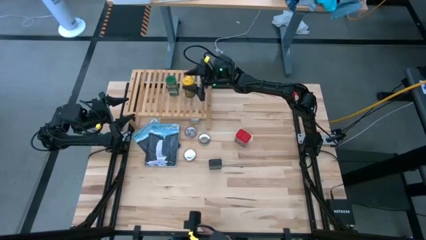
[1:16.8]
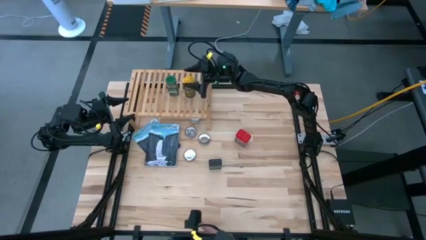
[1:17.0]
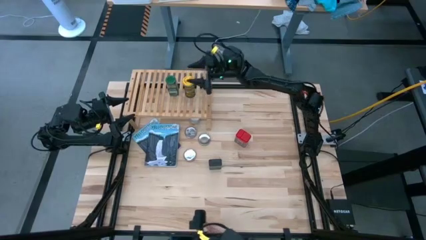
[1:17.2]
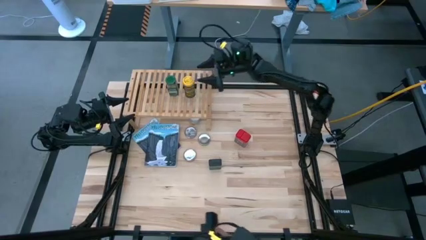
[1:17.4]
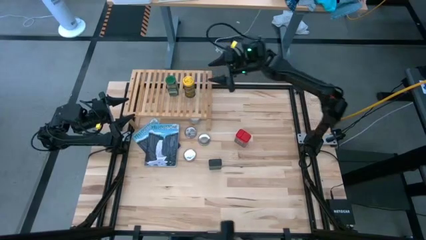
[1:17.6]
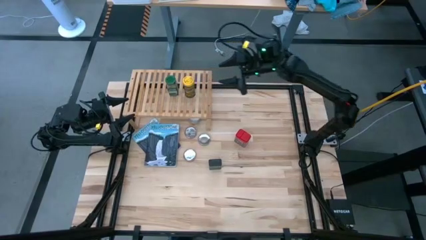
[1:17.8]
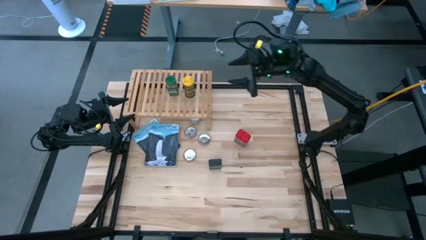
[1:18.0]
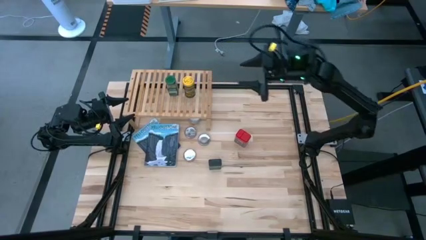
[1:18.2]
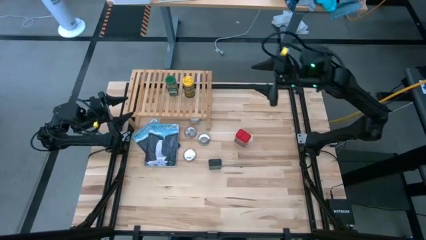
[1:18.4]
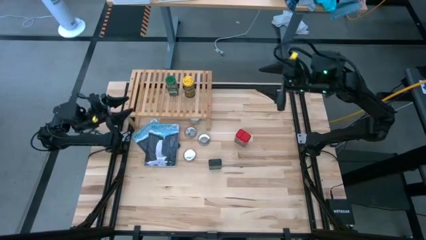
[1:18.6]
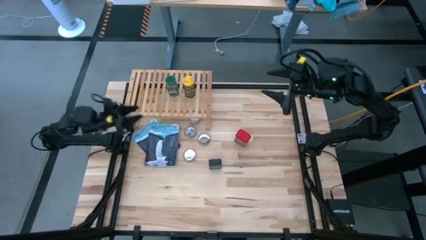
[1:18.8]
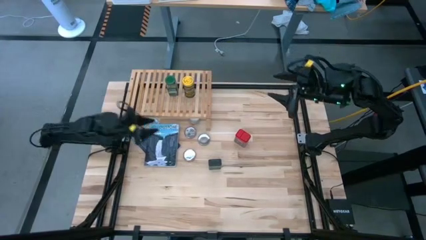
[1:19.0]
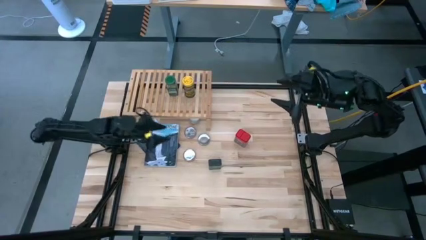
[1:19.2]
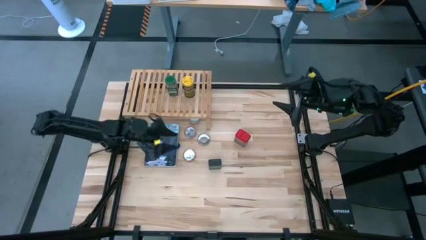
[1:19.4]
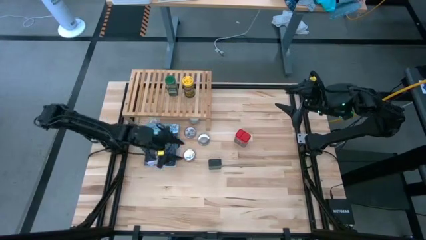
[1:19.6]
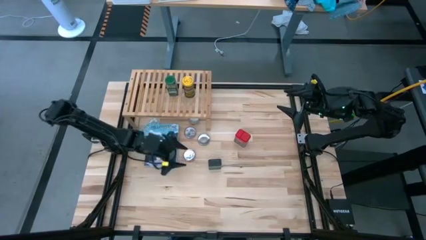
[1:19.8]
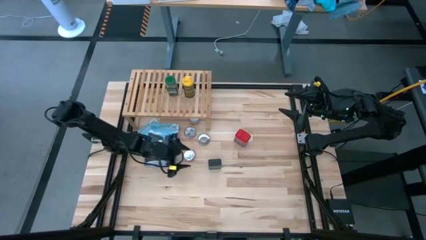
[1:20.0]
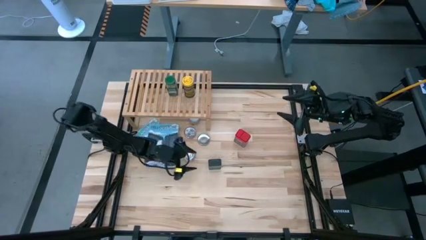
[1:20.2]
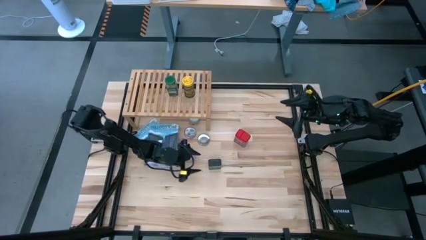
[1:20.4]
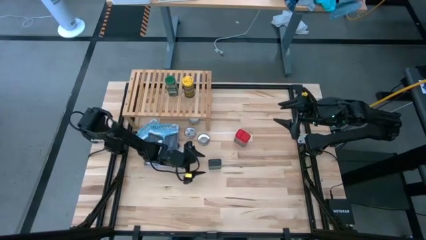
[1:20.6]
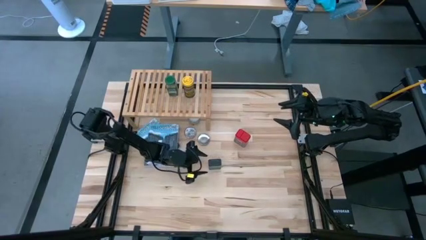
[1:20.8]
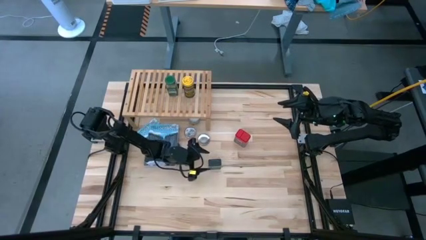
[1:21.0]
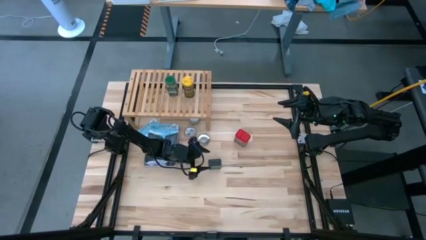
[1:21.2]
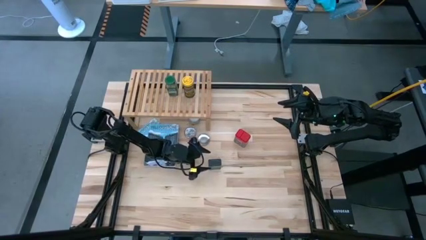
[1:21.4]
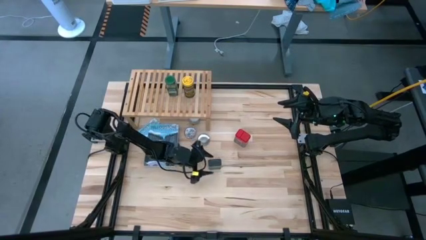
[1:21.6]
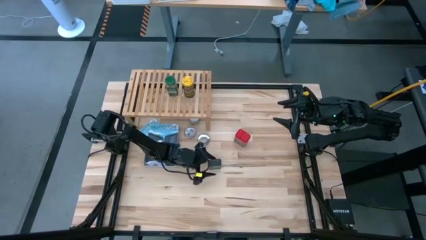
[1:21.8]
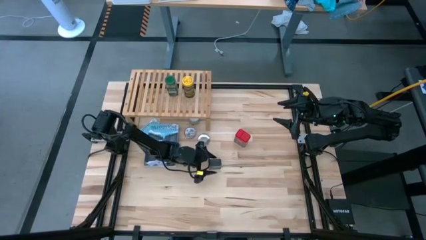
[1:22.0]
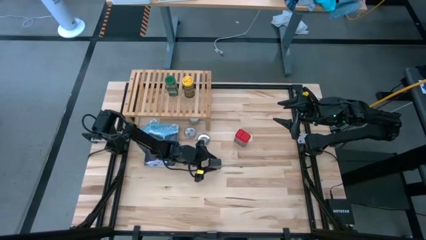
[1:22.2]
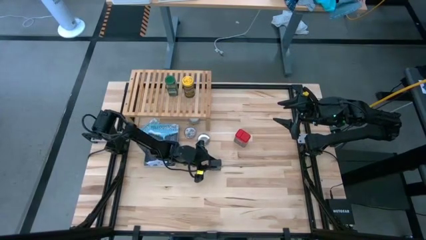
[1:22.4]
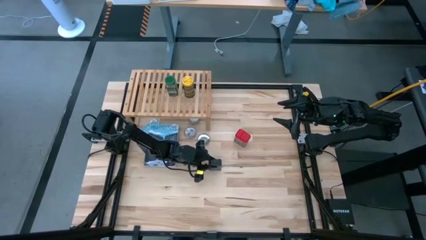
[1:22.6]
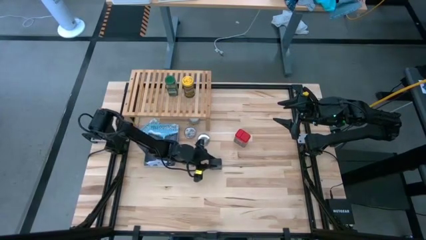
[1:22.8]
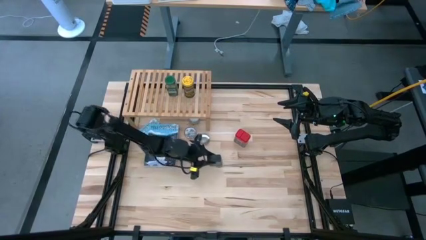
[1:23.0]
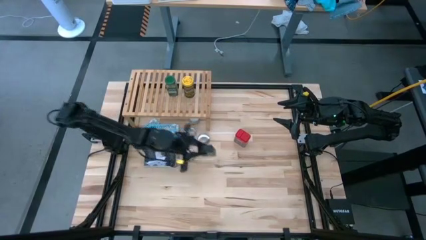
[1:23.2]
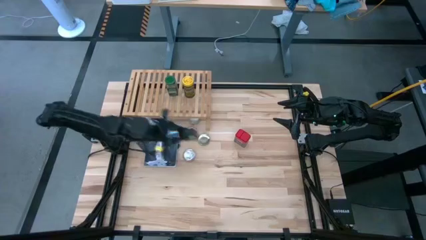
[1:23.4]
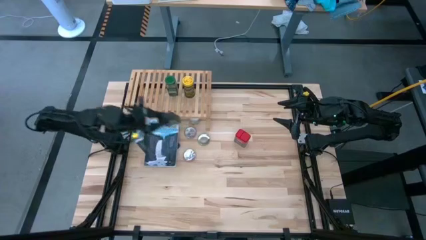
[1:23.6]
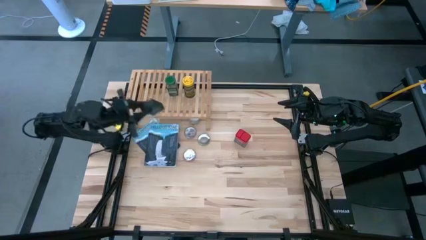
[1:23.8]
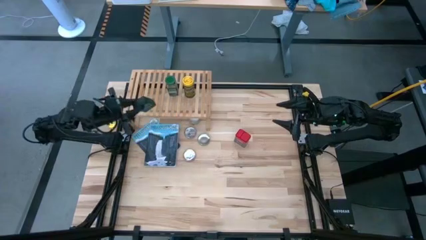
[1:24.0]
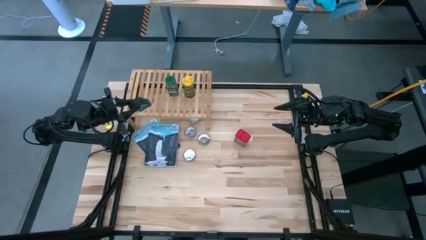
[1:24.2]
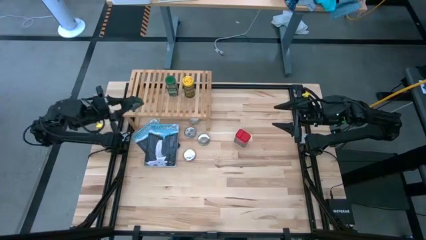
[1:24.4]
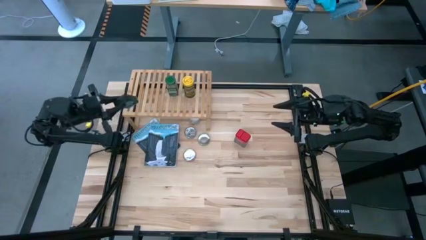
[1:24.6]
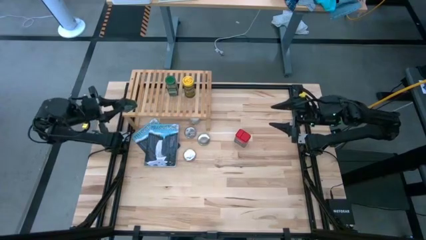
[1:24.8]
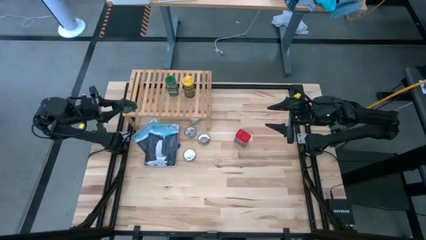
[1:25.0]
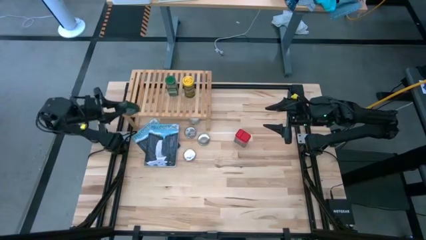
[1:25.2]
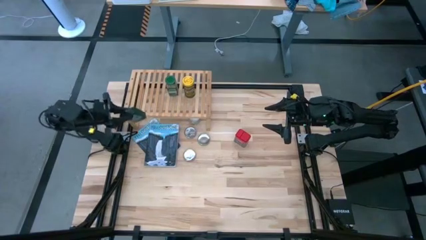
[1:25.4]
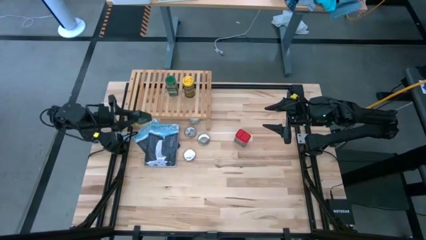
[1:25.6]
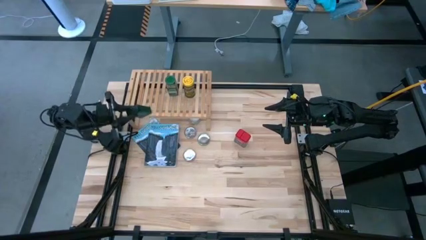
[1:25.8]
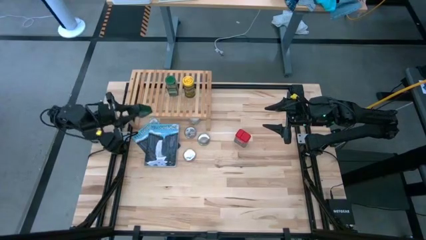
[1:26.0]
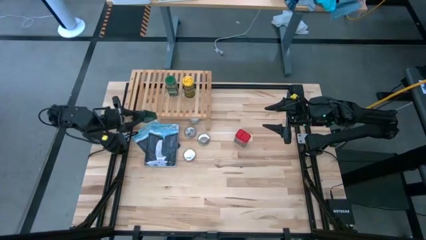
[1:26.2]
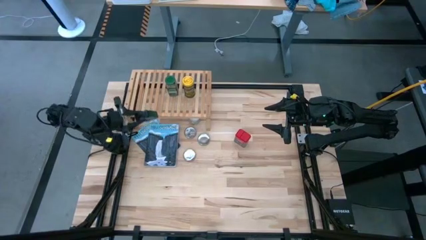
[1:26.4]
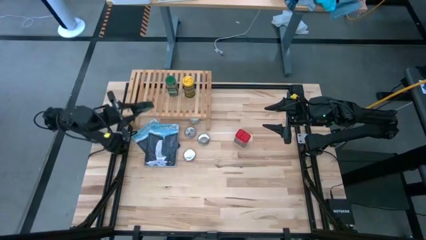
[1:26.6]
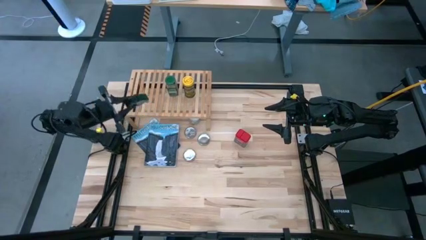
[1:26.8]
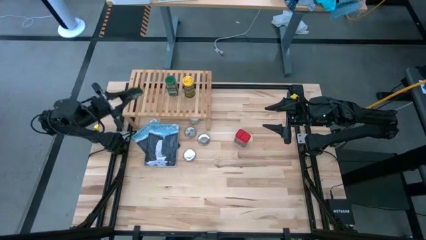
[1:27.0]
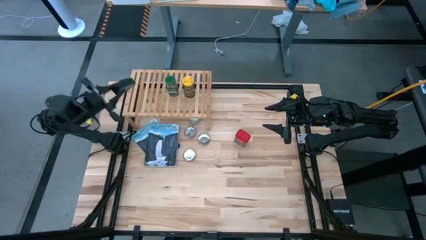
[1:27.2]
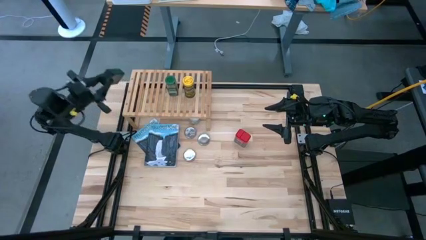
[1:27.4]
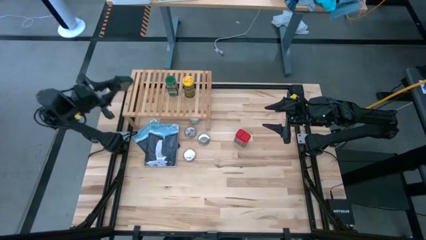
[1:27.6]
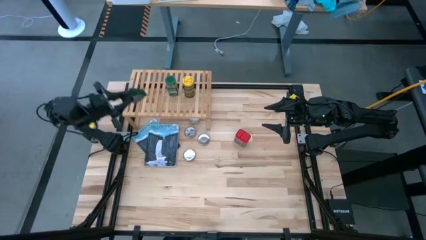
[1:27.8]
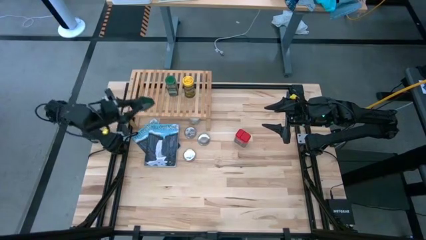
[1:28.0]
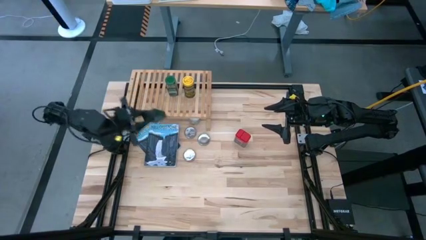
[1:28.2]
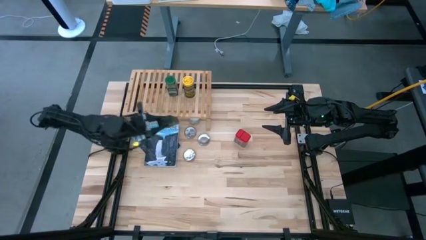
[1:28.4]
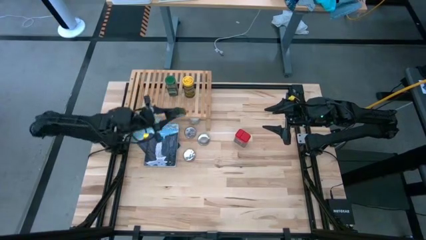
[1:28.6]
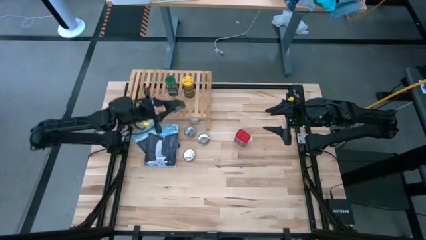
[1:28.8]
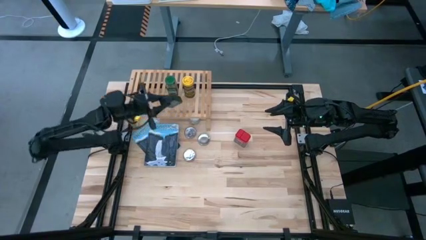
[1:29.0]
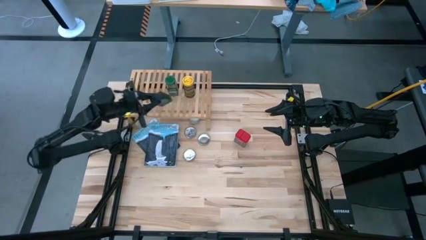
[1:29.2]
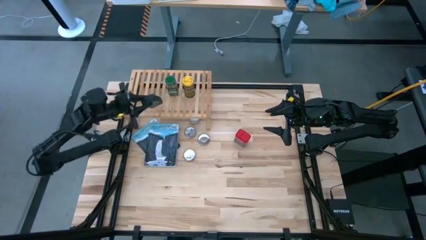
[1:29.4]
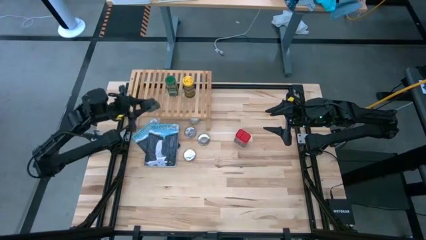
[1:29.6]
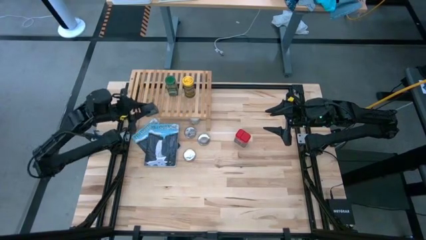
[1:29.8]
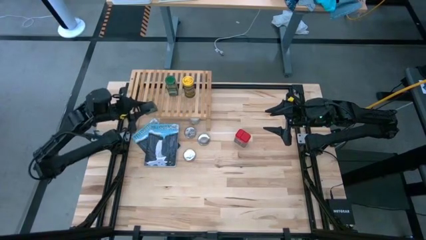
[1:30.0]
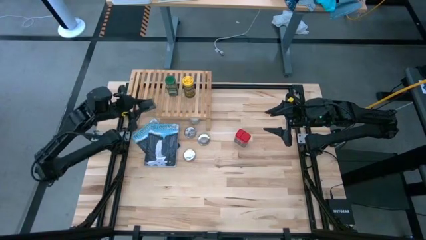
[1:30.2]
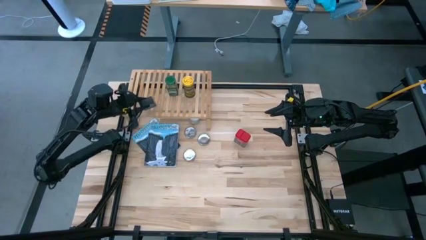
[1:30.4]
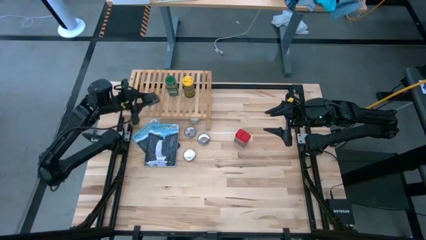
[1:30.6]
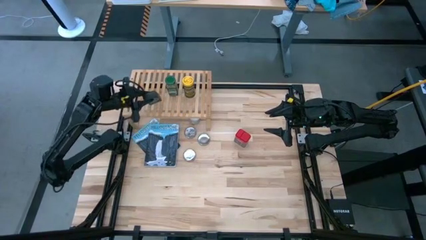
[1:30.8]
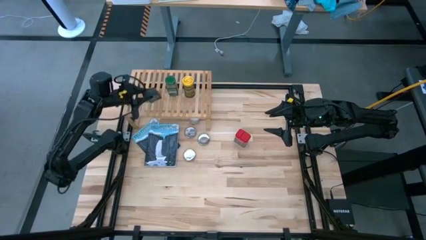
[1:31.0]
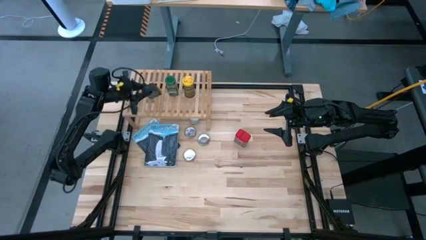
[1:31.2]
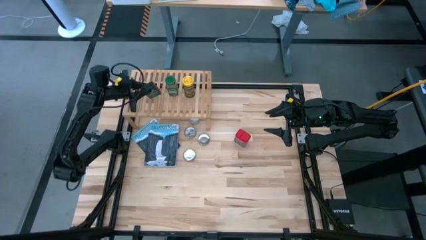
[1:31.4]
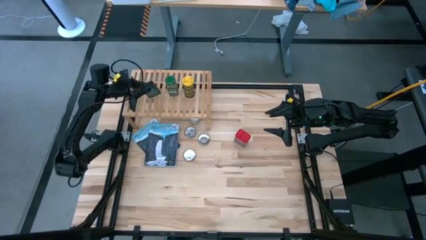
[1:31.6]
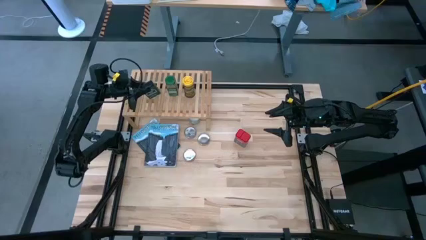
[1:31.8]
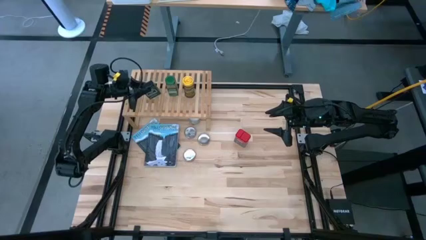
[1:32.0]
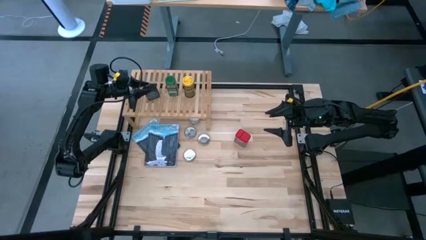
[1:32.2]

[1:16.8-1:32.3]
Task: Shelf spices
Put the black seasoning can on the shelf

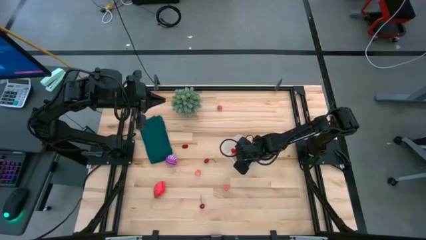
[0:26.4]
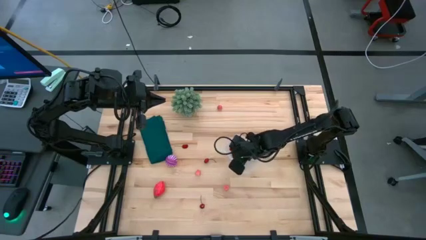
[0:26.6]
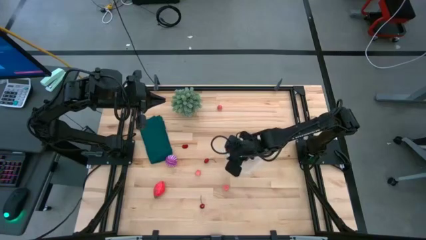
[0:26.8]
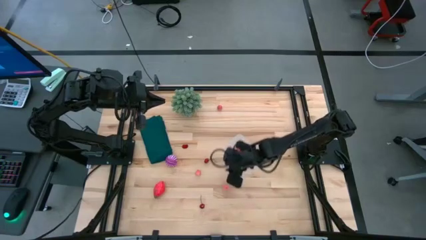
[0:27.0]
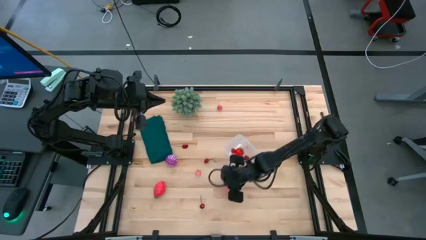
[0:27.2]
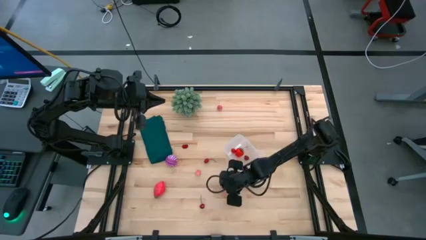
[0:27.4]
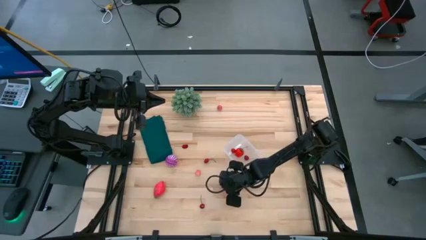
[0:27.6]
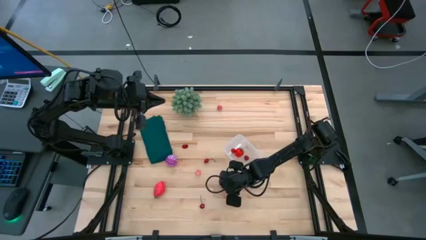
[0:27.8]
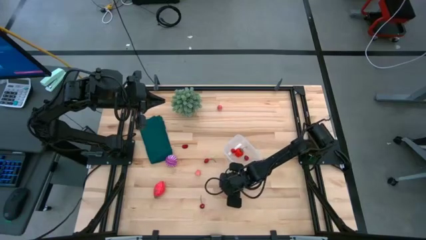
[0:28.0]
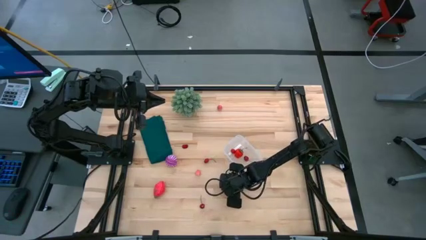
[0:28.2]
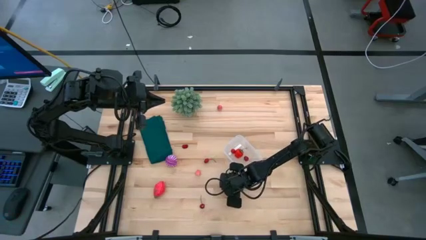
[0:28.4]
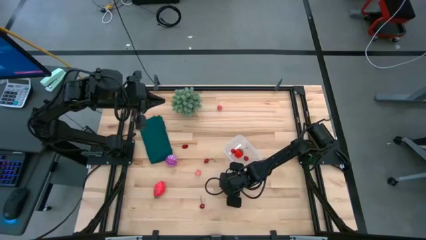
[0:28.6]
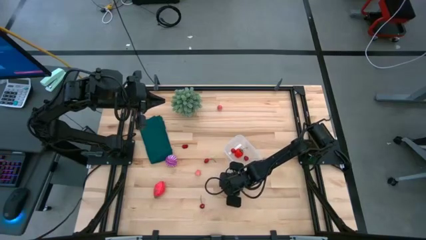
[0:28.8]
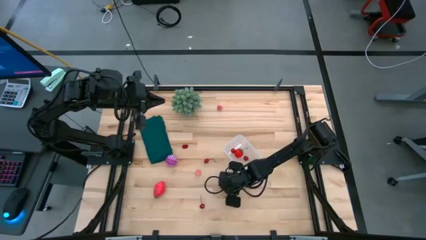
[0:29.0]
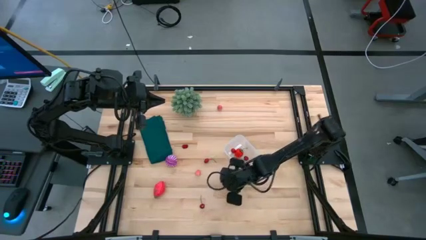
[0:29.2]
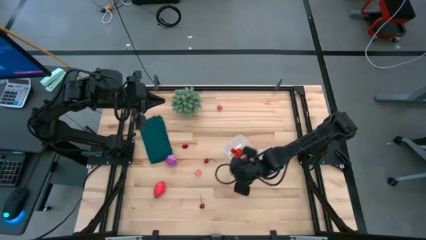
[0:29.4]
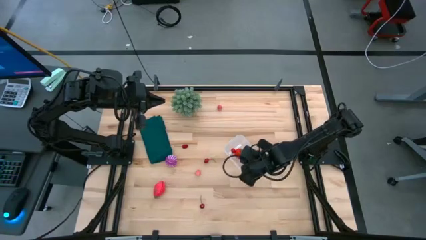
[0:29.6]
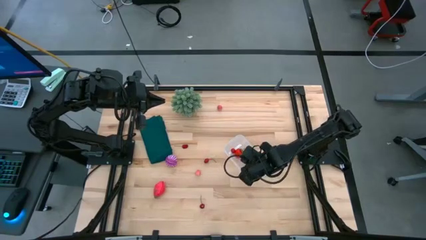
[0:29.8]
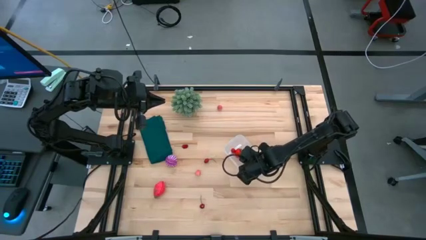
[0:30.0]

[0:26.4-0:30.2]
Task: Pick and placing Produce into tupperware
Put the bottom peach into the container
